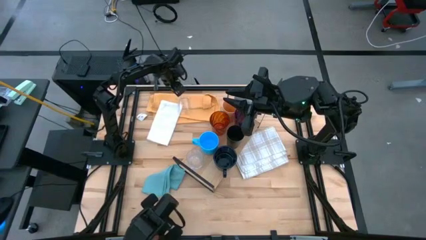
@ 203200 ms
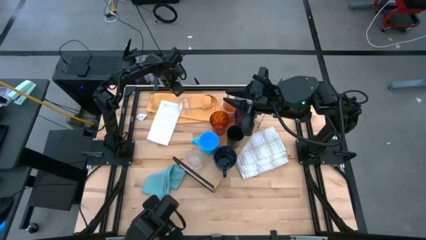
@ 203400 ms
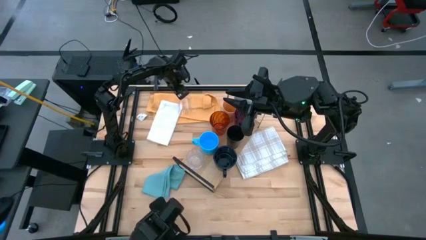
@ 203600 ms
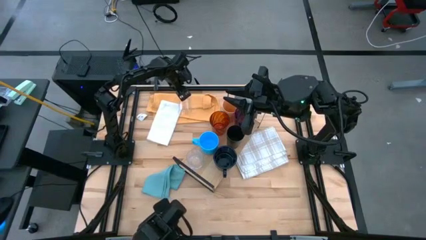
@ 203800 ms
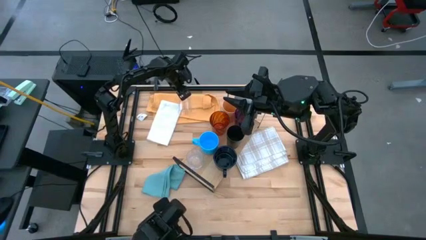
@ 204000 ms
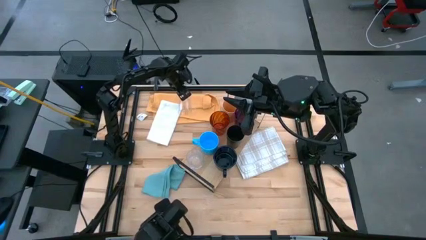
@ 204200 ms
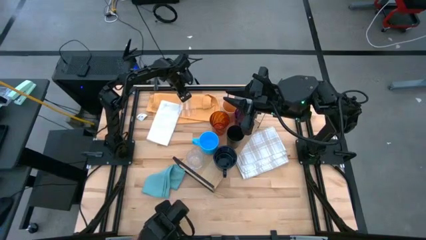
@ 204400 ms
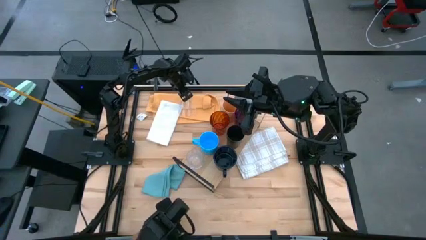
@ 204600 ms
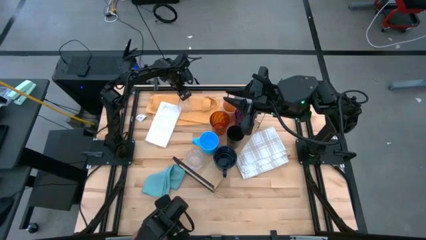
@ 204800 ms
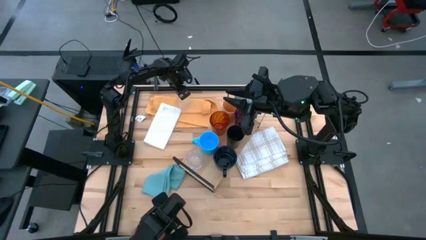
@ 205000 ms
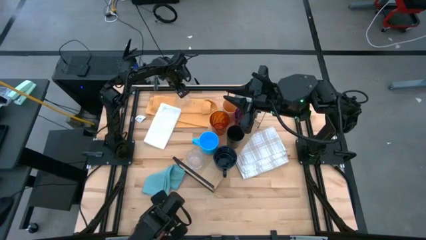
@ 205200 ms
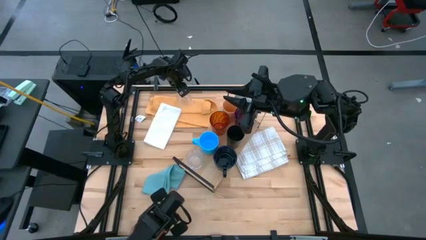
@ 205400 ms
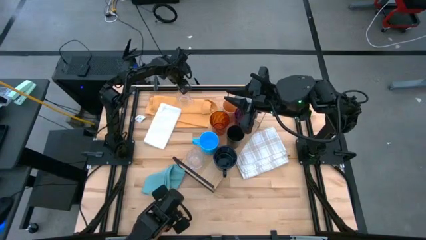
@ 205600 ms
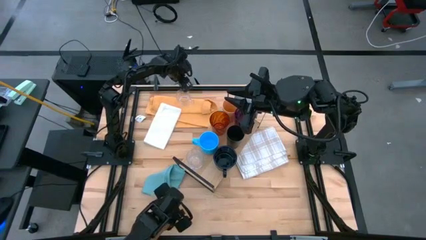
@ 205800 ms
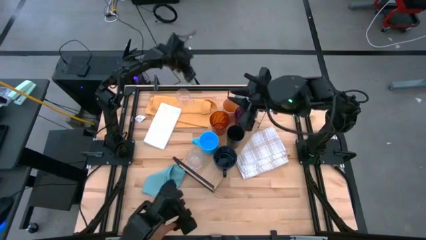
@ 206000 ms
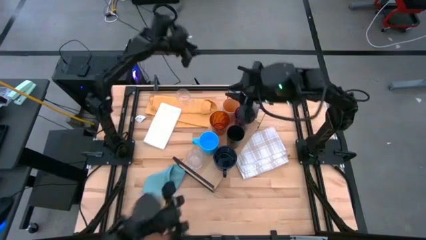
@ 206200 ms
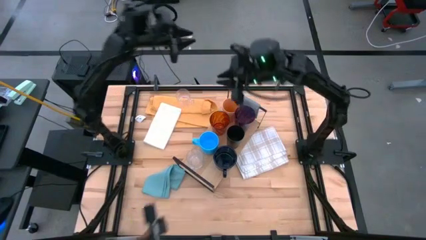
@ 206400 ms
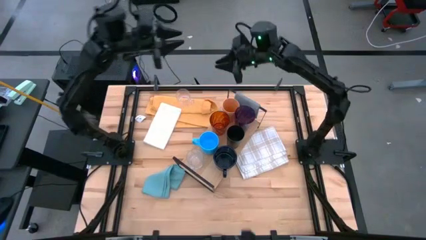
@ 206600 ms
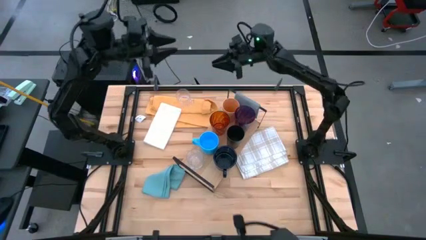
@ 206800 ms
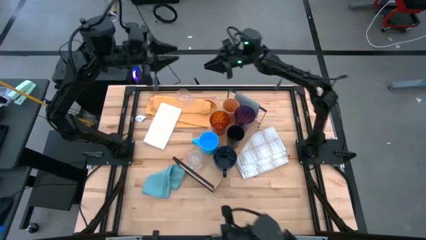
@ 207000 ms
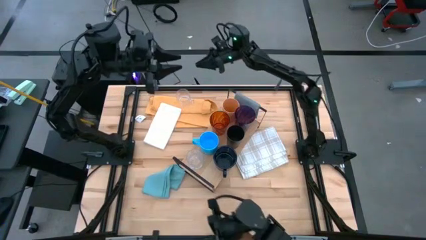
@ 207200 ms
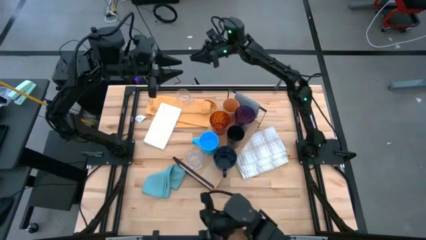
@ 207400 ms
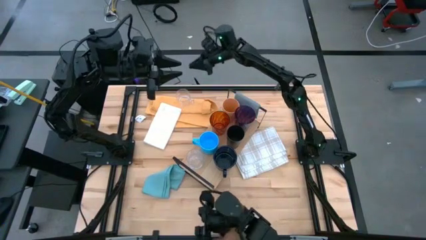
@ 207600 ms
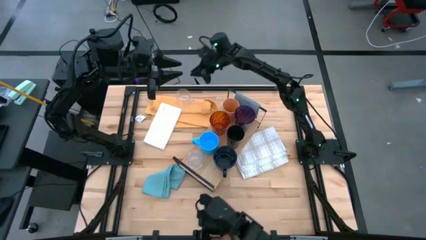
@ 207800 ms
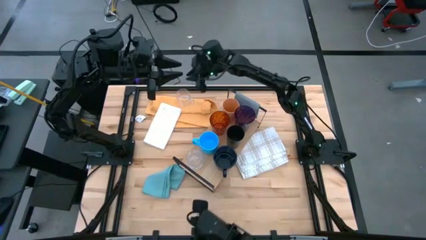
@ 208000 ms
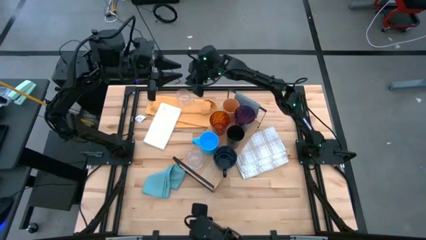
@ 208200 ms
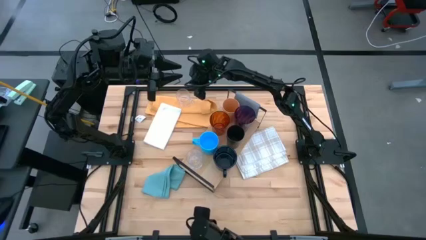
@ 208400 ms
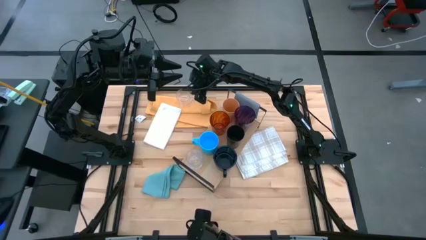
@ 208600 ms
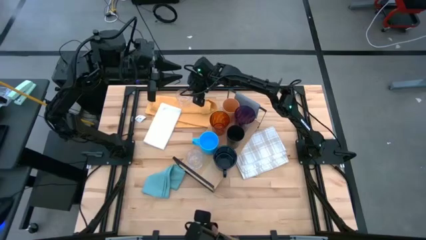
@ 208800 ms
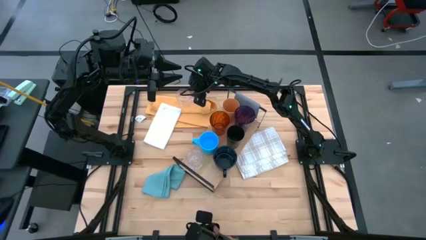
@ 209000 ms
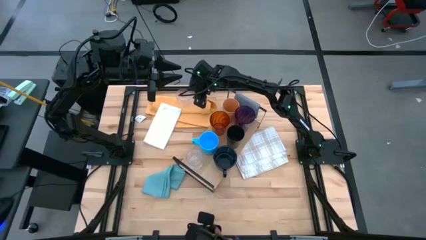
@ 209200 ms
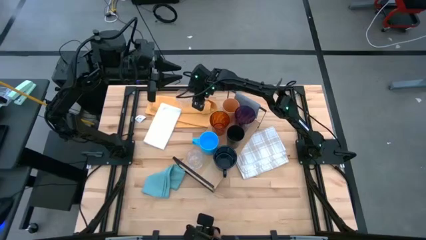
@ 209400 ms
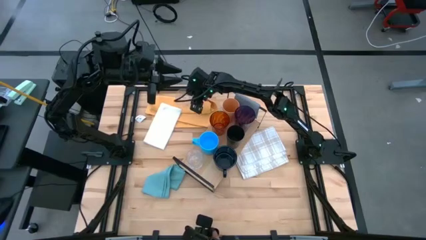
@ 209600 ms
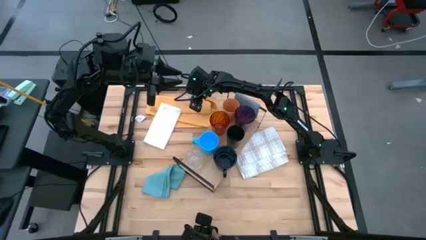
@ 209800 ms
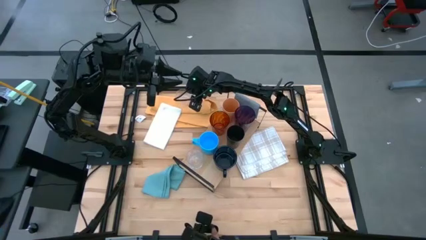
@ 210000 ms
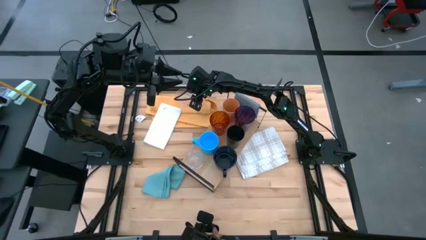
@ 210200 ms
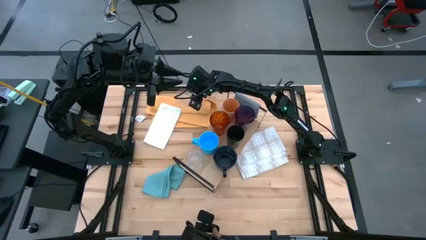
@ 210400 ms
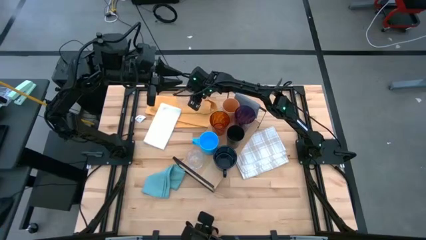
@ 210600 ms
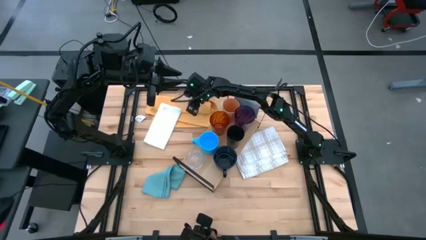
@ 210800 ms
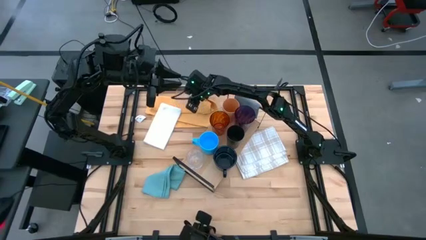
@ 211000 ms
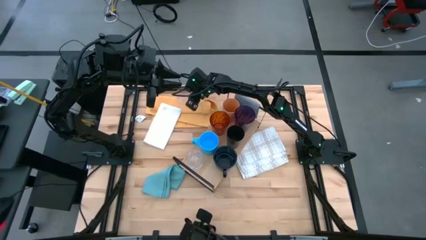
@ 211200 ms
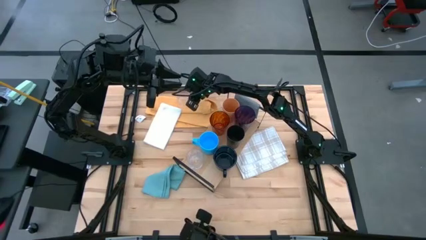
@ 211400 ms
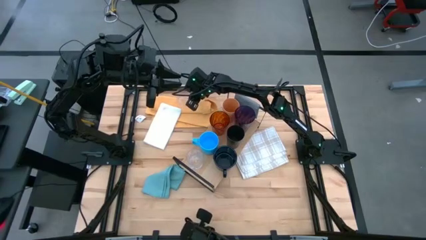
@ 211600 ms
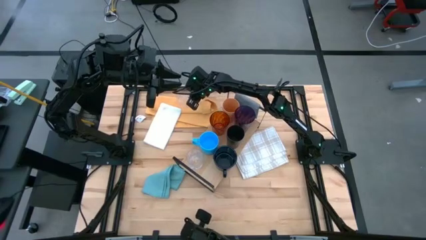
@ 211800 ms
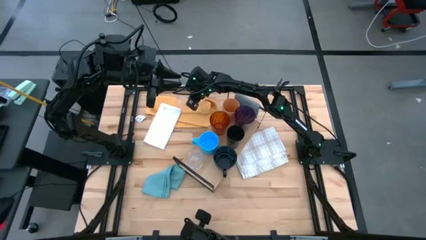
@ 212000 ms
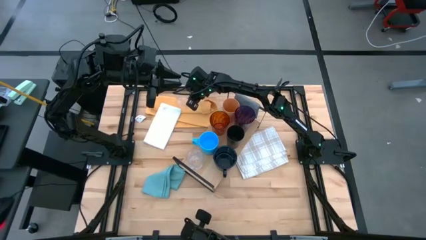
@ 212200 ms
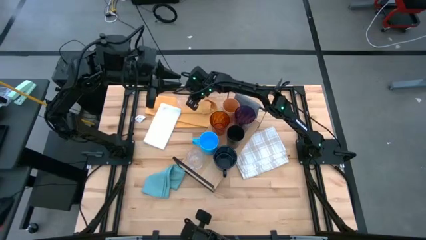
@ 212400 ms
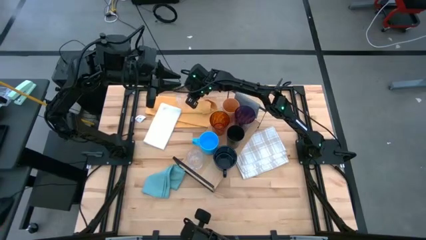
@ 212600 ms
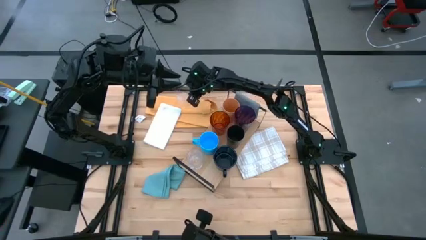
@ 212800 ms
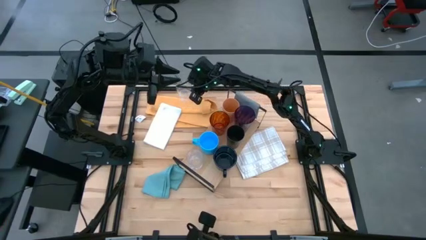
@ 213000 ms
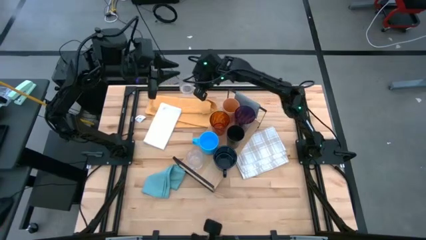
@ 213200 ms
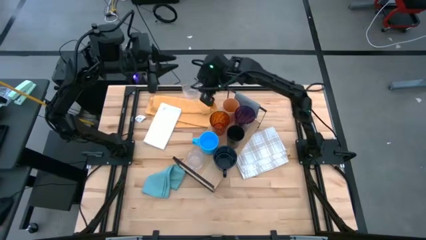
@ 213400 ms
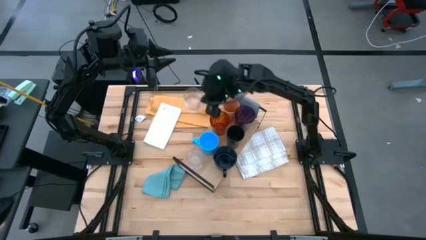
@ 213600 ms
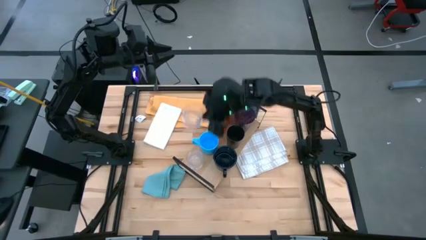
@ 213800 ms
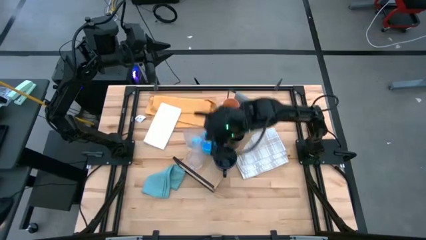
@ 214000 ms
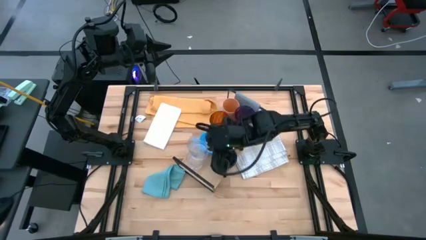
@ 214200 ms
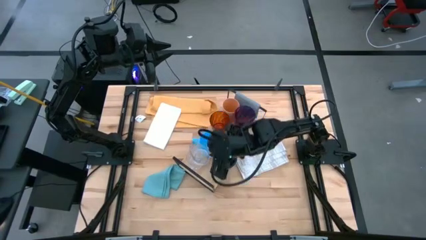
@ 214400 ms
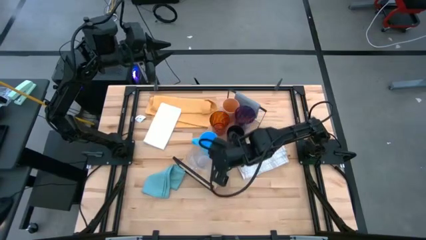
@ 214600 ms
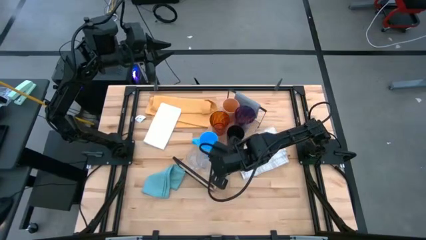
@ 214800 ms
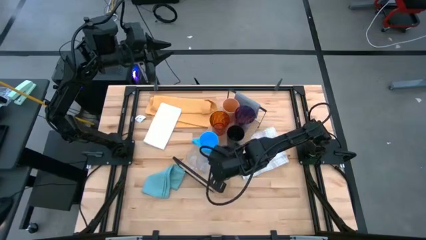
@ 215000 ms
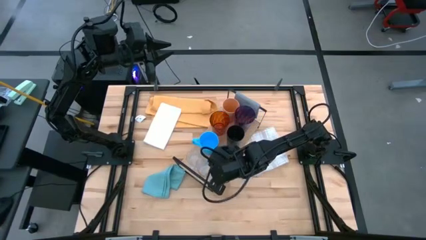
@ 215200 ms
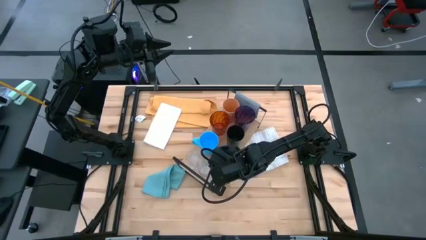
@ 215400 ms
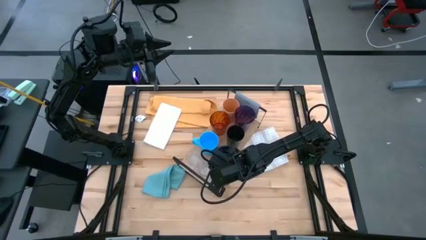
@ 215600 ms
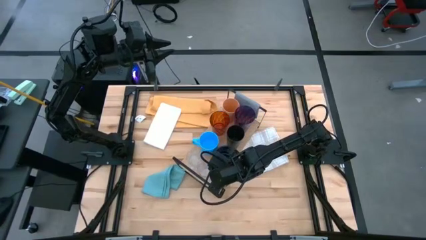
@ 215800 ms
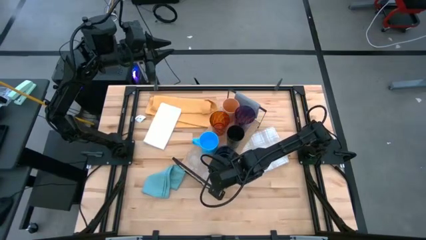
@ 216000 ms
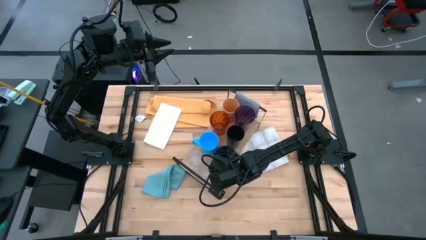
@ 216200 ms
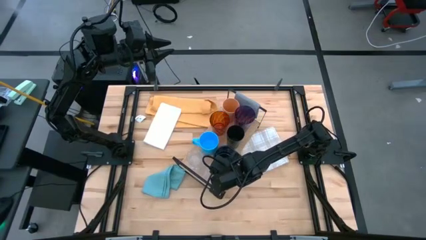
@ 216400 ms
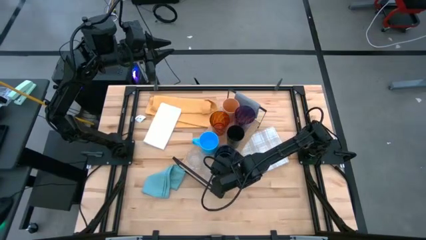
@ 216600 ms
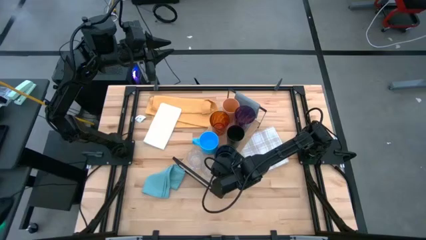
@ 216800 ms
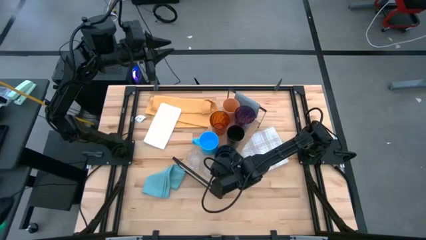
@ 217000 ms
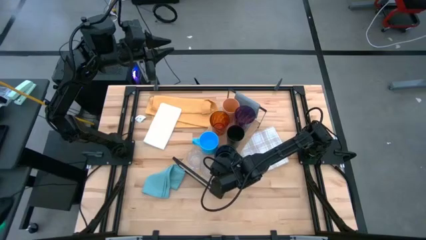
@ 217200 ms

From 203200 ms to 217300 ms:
Task: Stack small to large cups/mugs on shelf
Put the transparent mug on the shelf

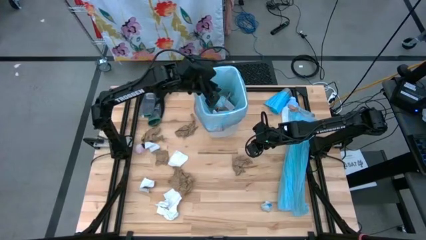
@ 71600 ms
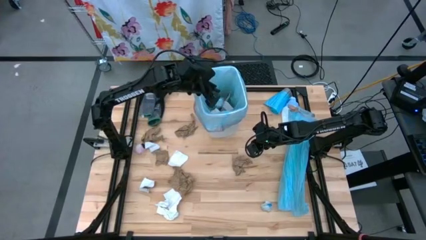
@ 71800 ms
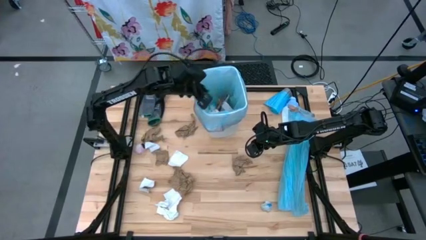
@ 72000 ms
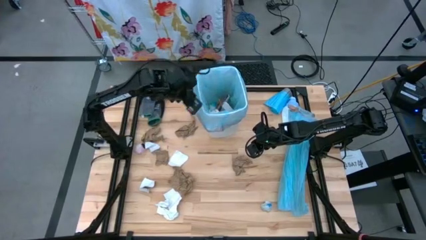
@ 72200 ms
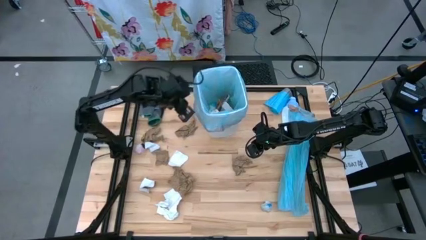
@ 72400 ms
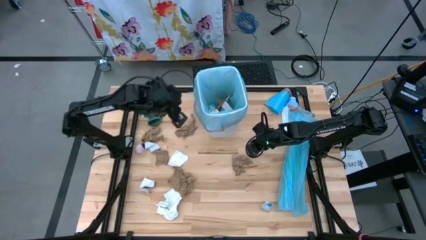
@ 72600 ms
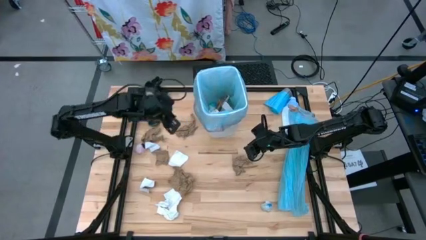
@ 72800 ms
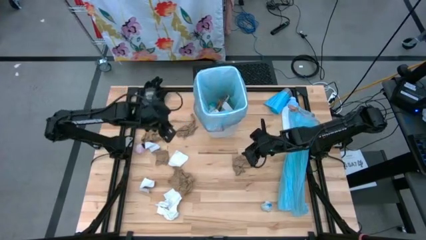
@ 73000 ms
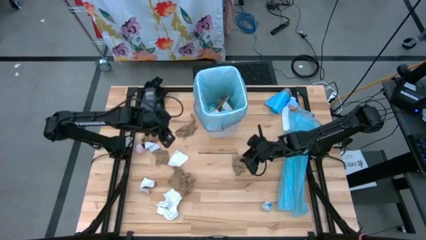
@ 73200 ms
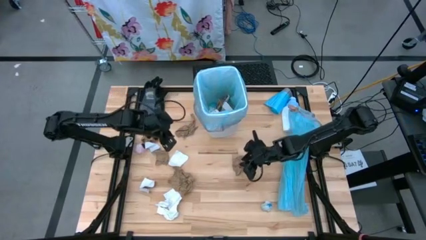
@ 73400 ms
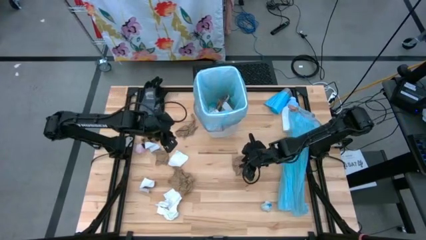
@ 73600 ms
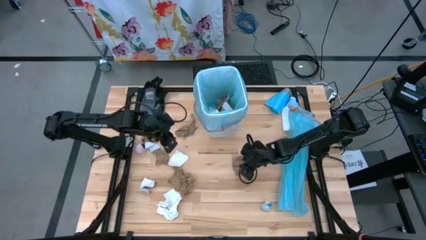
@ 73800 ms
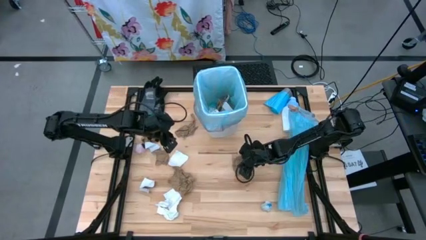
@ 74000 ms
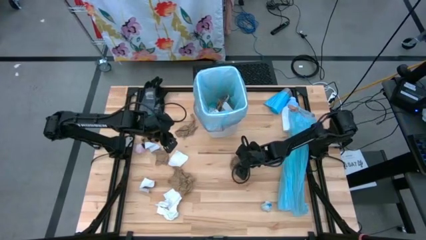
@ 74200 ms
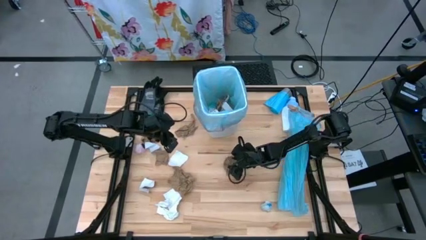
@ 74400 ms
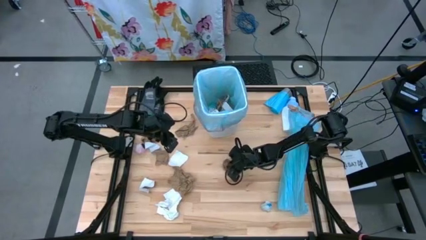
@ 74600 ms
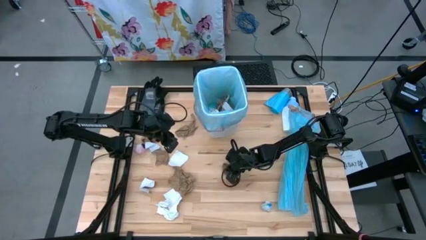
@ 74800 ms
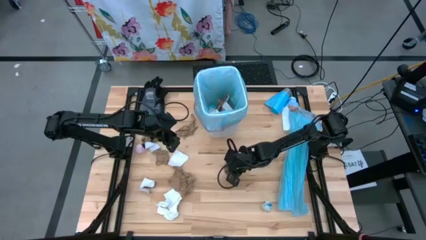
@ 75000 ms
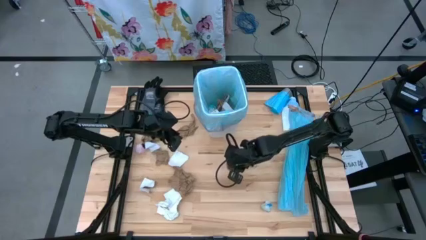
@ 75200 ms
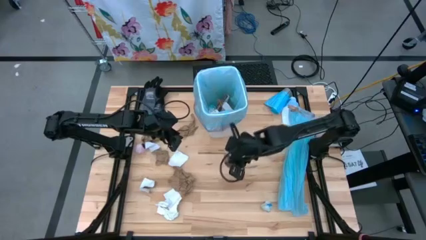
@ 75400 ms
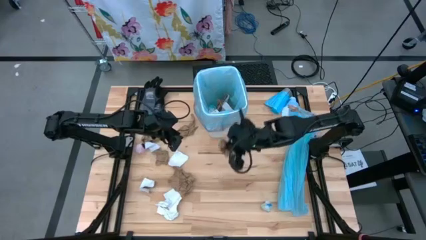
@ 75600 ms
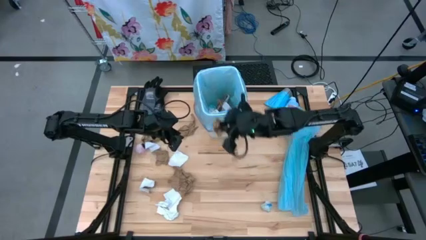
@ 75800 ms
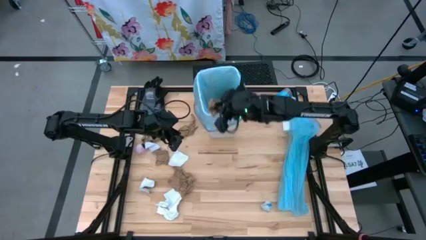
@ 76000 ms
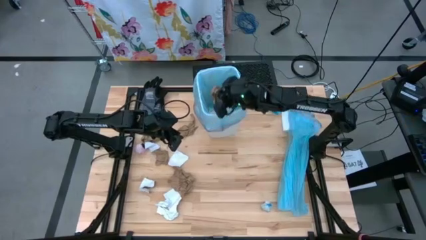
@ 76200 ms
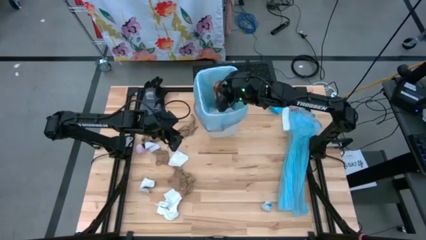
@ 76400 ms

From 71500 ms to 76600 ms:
Task: place trash/remove bag and relplace
Put the brown napkin into the trash bin
